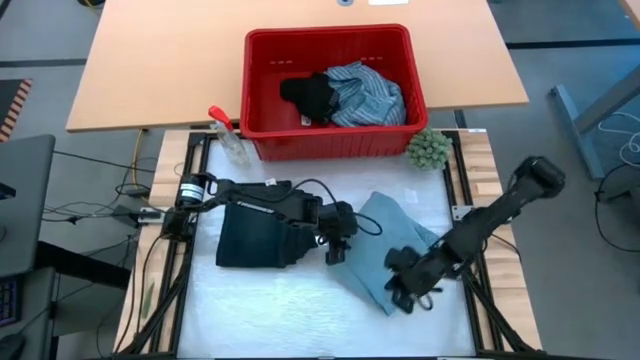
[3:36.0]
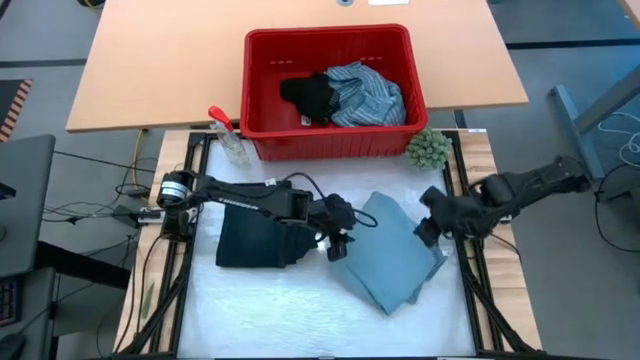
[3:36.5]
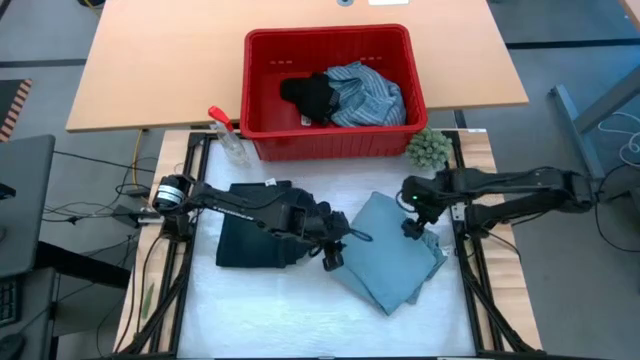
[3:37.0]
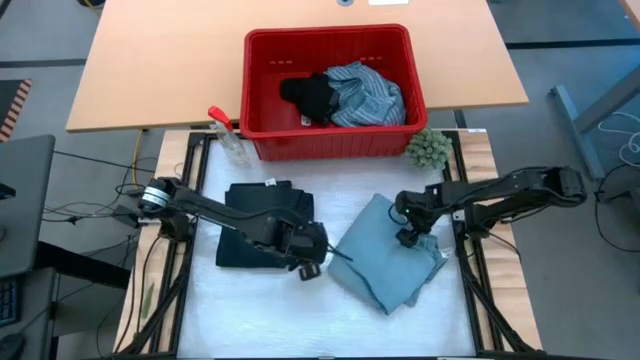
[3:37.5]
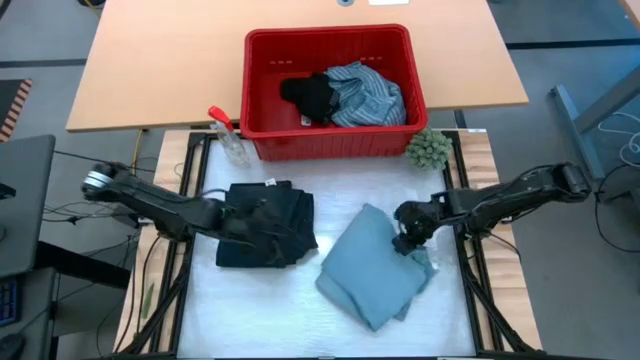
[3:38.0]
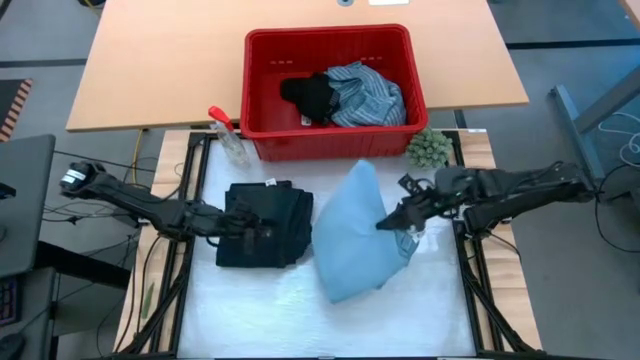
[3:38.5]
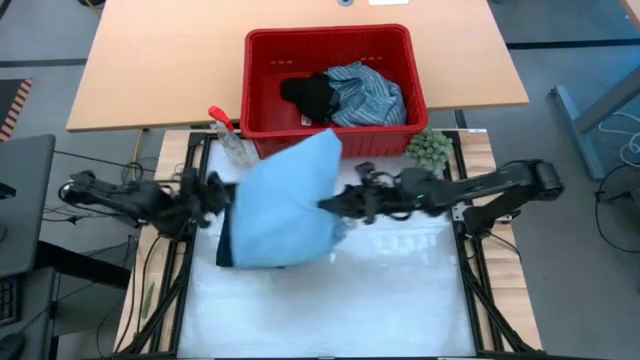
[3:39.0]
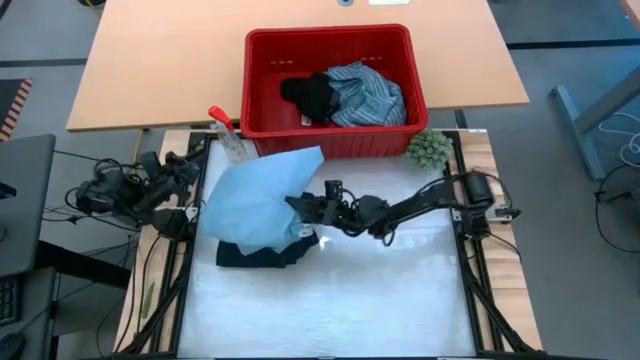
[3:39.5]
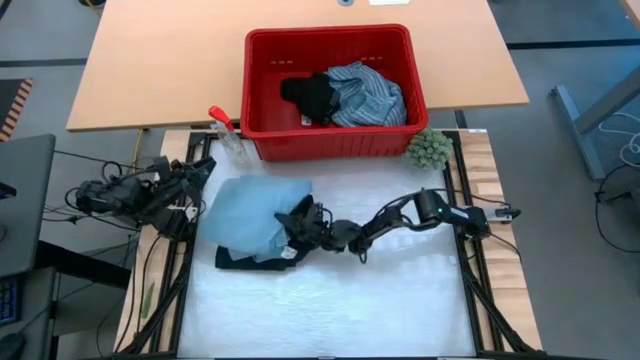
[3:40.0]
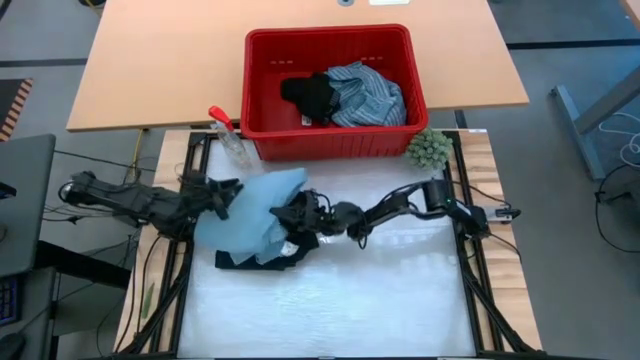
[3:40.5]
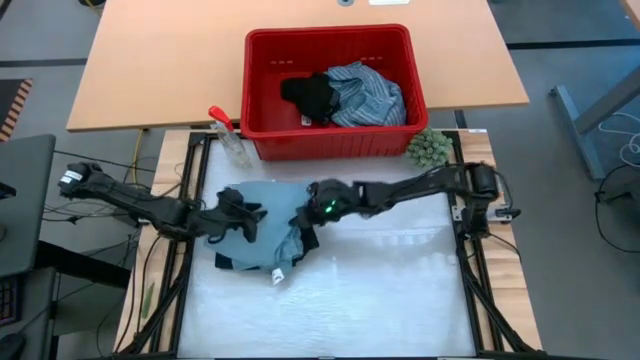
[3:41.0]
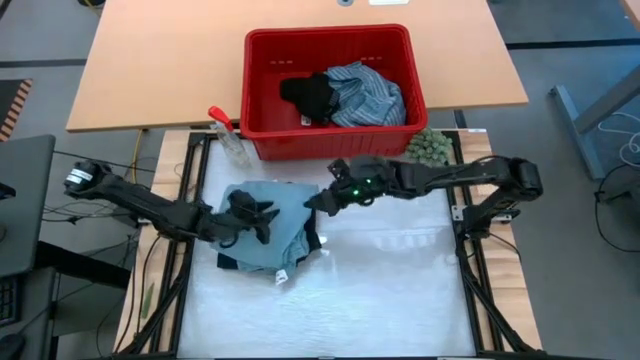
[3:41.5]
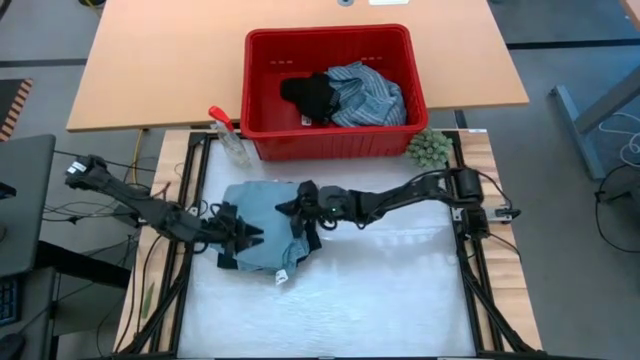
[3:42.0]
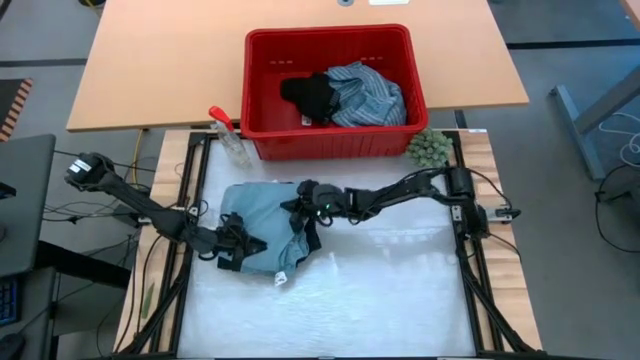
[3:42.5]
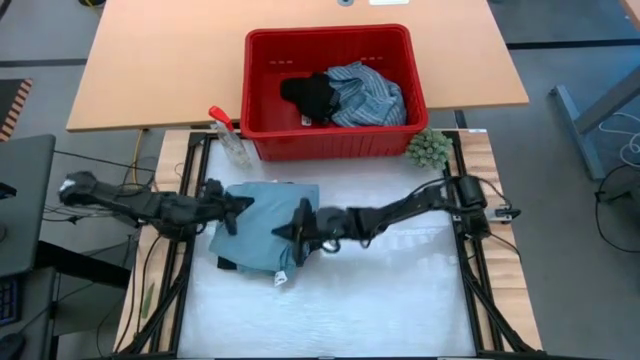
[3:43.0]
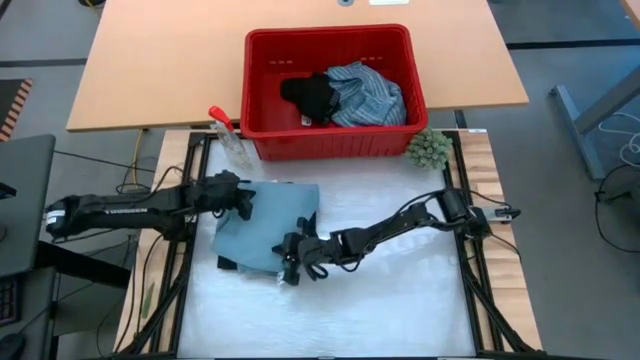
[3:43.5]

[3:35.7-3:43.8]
Task: Fold Laundry from Bin
Stack the light blue pants on top of the dark blue pants

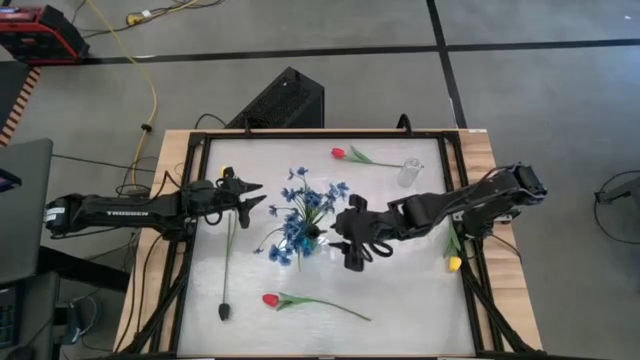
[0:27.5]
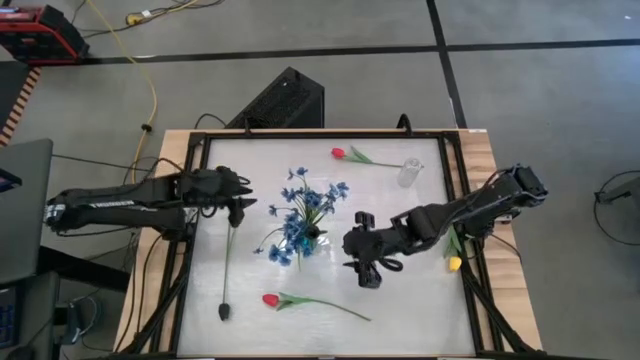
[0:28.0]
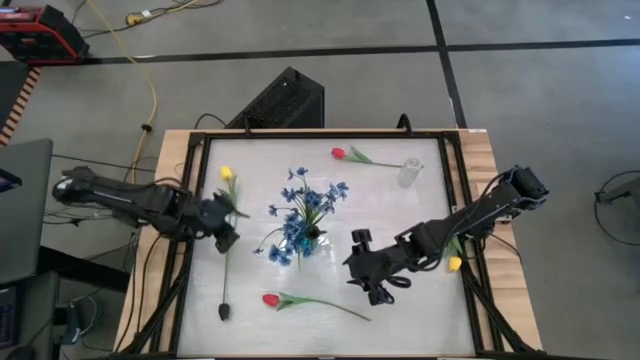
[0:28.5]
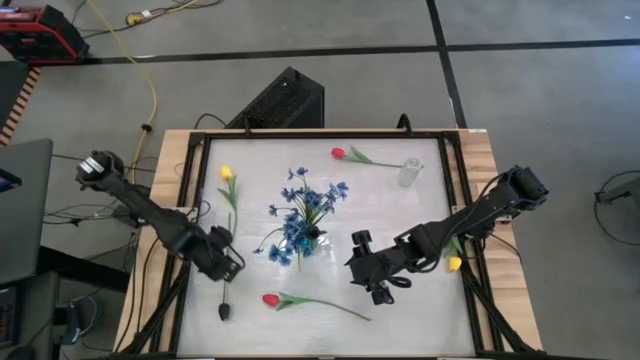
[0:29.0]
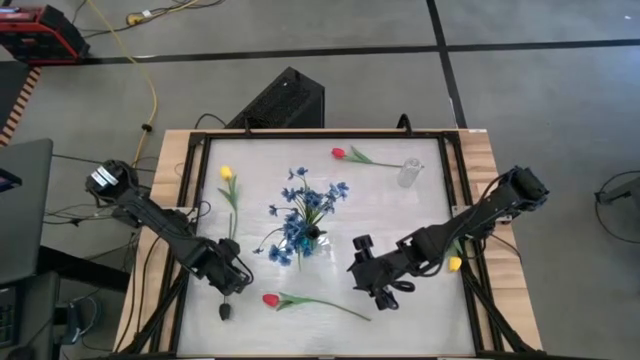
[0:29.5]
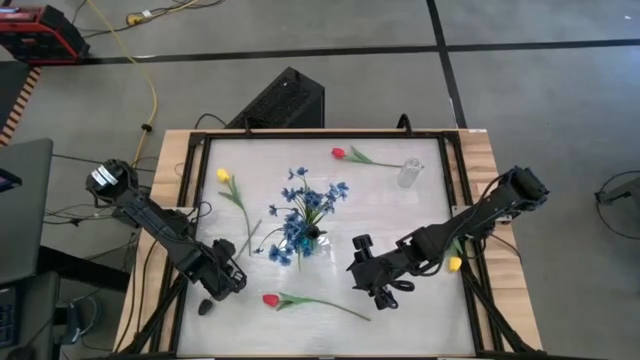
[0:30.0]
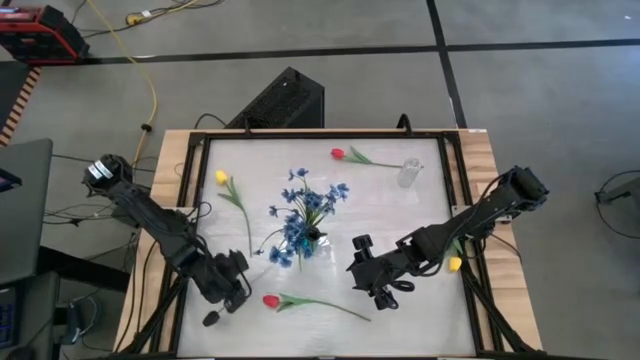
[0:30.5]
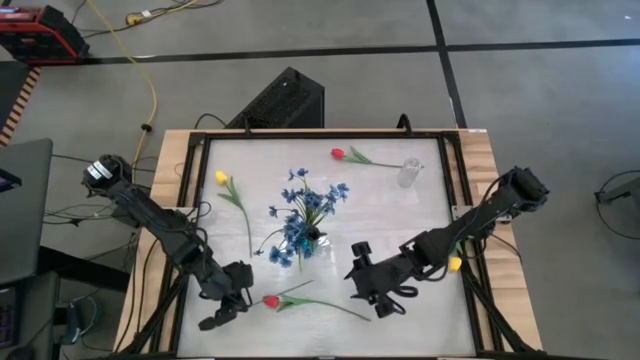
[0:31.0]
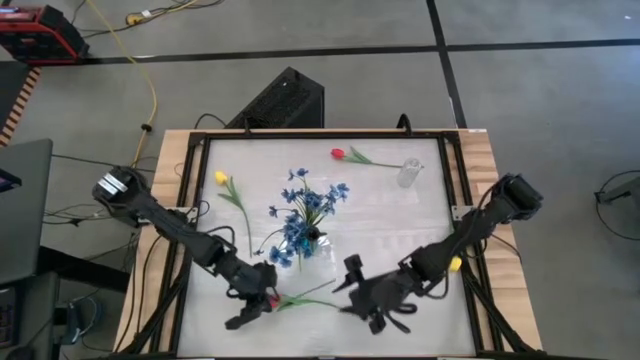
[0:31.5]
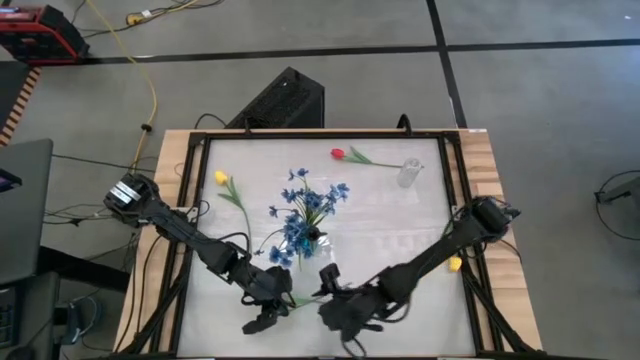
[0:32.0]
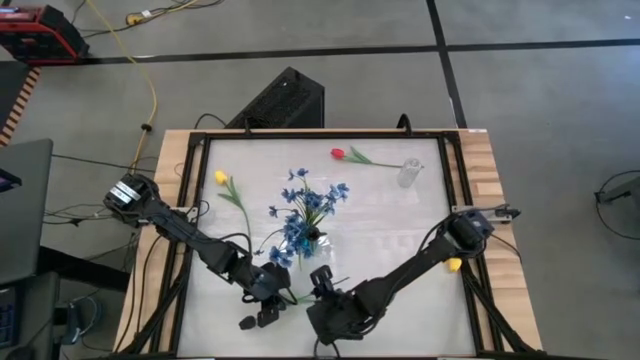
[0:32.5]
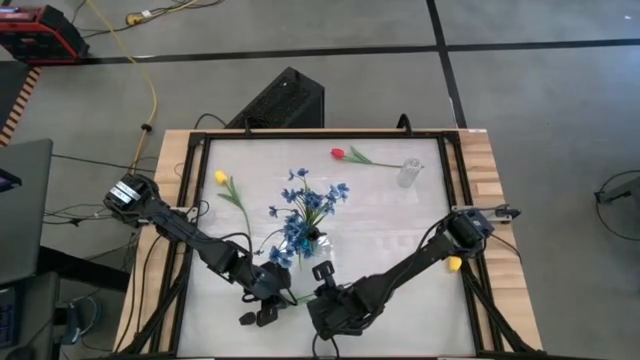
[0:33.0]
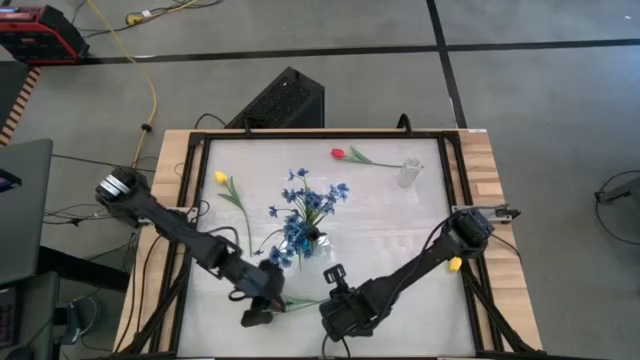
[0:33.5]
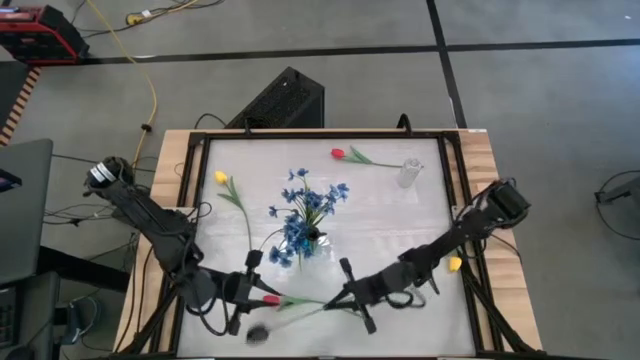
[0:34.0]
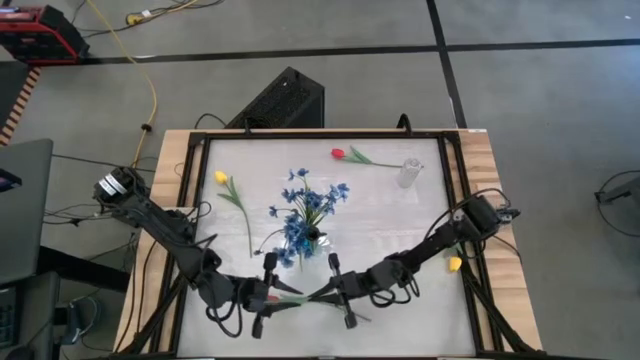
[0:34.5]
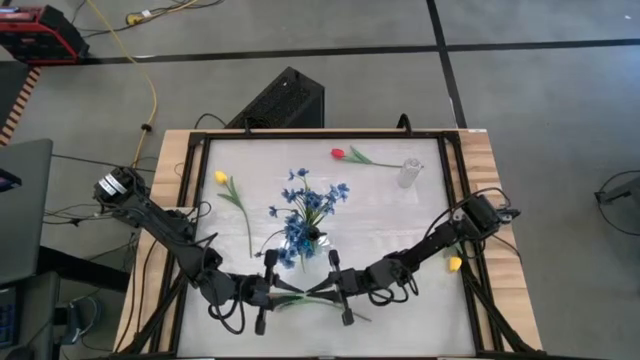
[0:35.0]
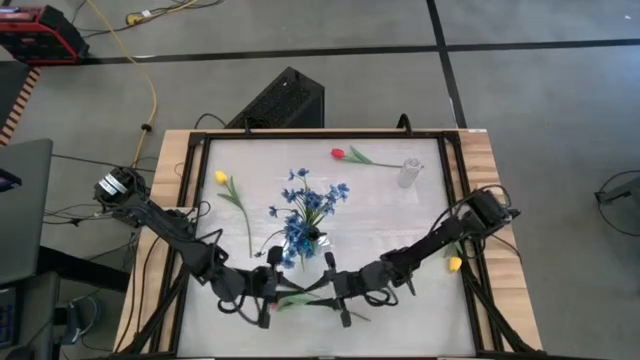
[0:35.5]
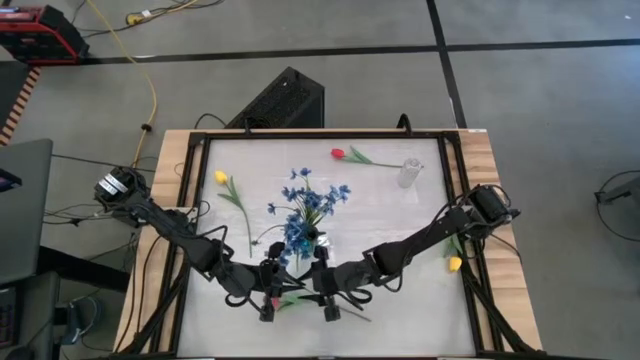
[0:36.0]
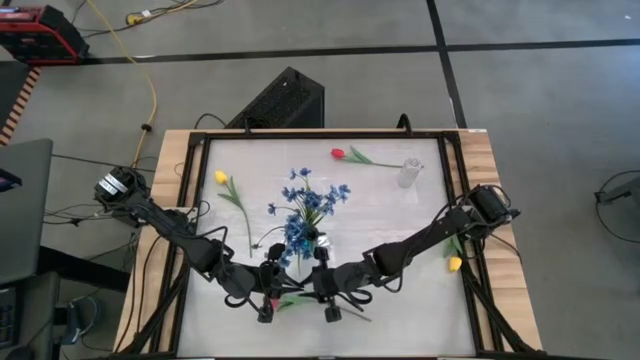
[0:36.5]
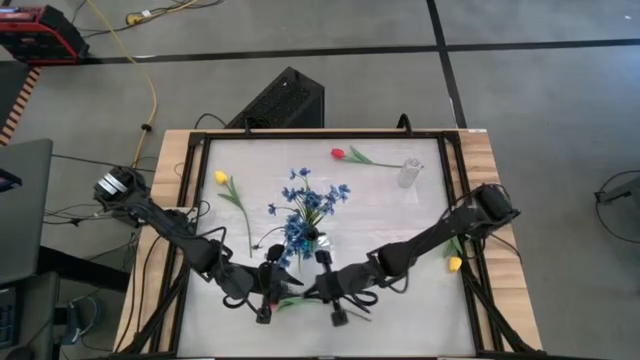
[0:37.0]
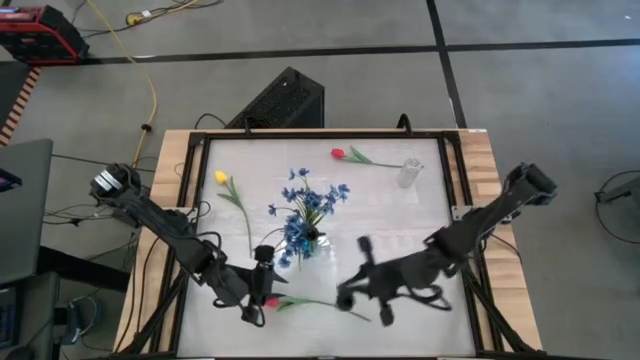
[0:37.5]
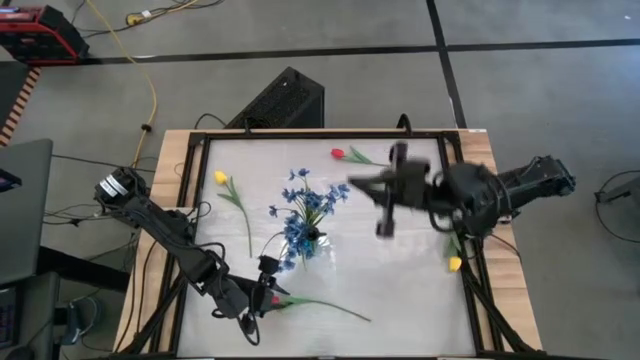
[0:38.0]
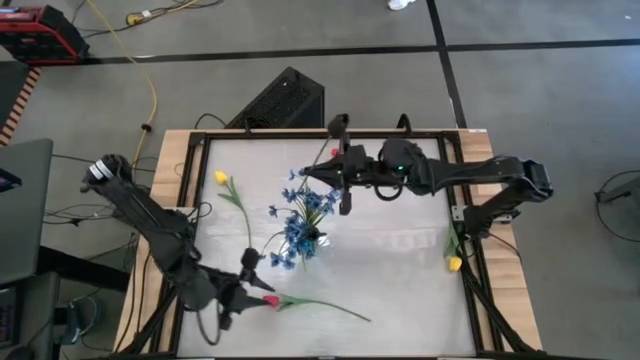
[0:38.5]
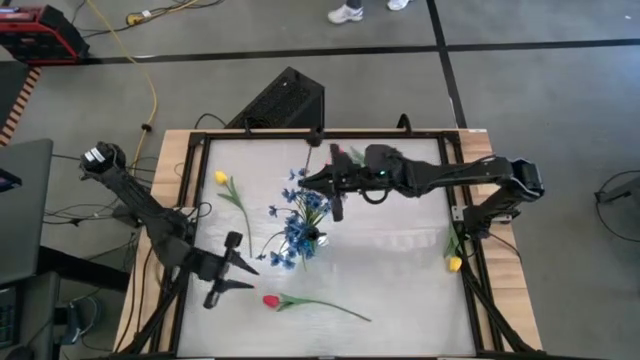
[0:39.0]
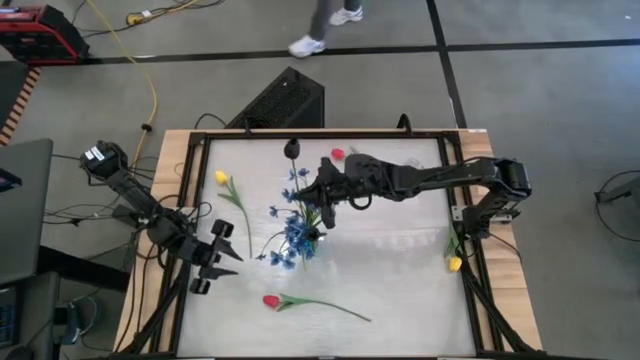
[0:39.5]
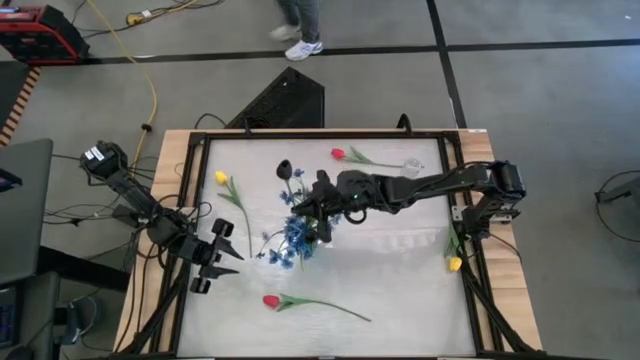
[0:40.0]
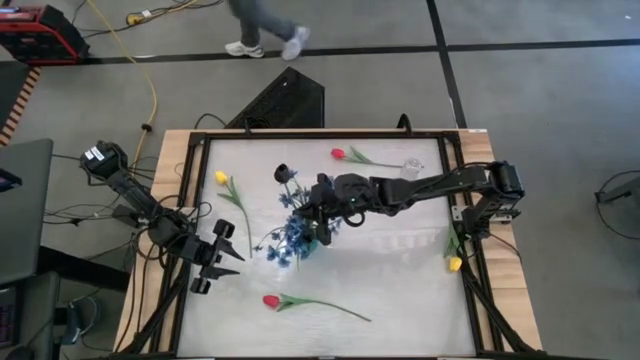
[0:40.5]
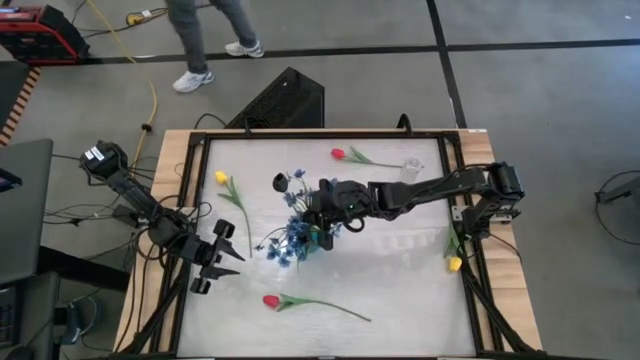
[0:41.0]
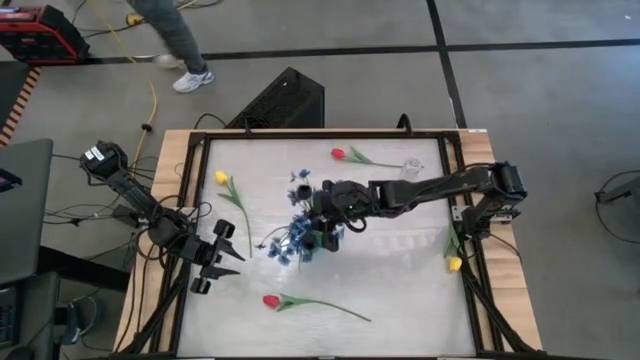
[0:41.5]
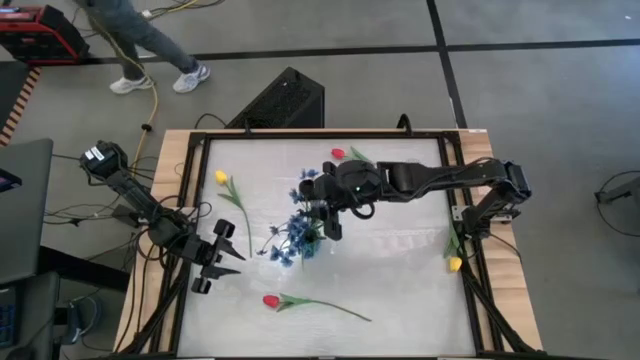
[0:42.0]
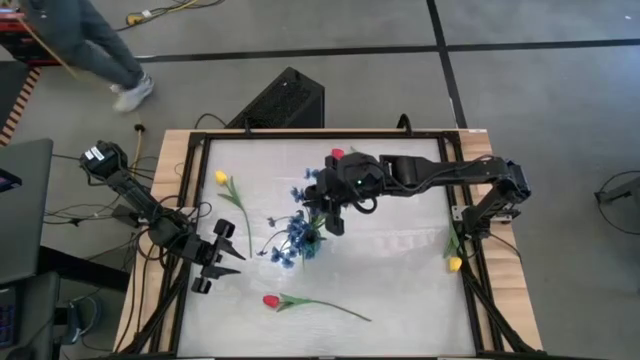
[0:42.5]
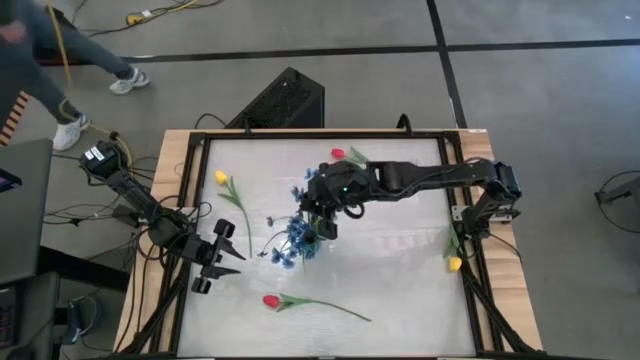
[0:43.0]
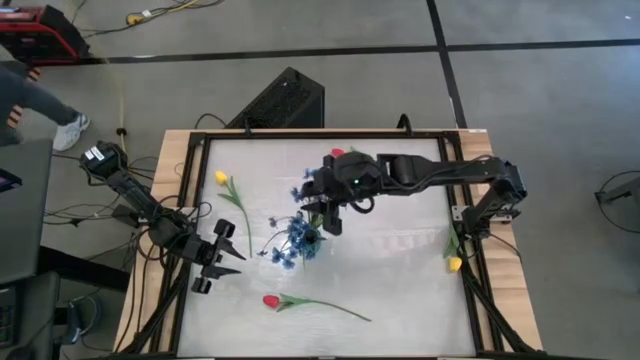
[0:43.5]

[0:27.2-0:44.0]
Task: Sort flowers into vase by color
Put the black tulip into the blue vase
